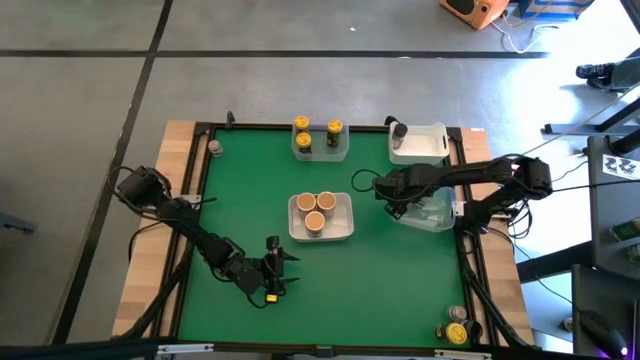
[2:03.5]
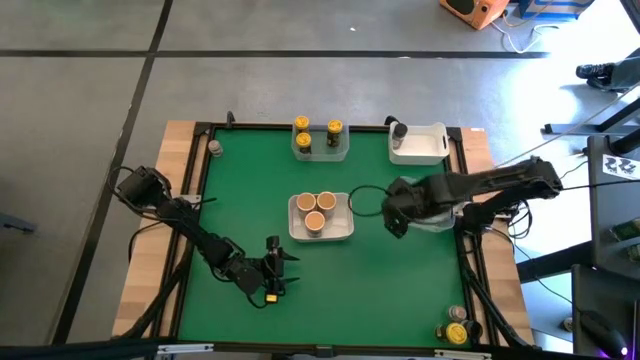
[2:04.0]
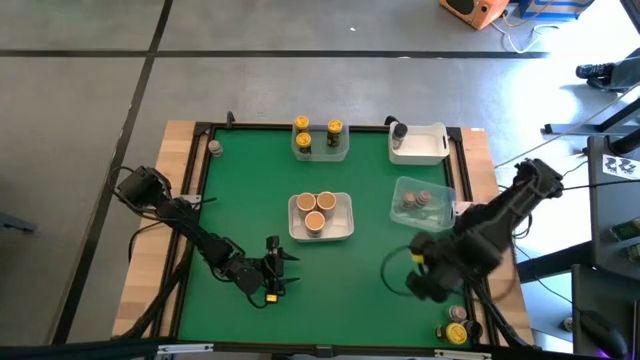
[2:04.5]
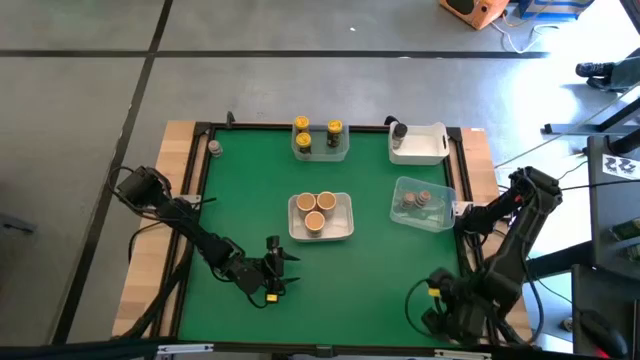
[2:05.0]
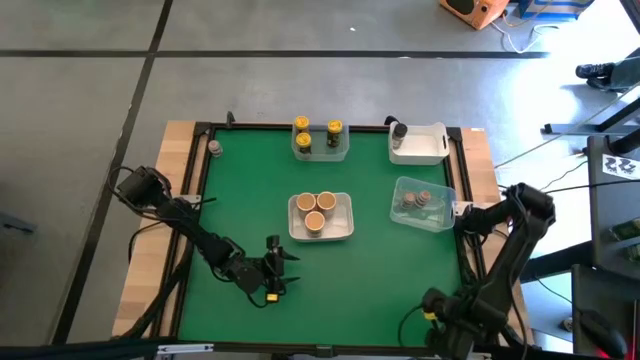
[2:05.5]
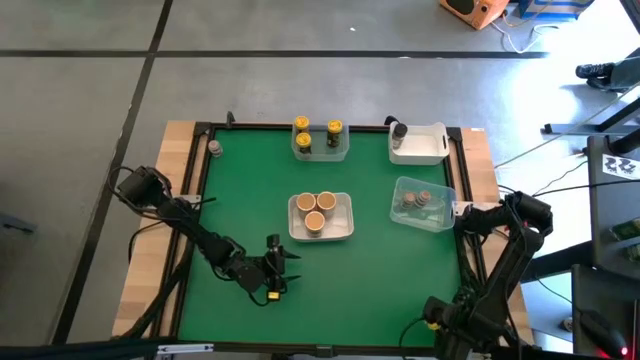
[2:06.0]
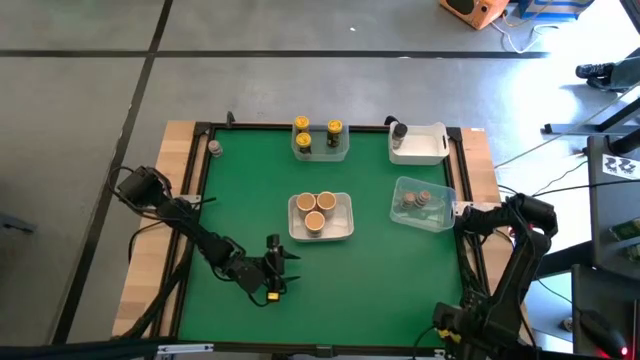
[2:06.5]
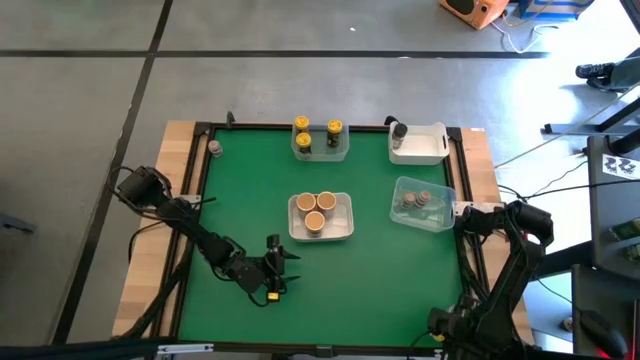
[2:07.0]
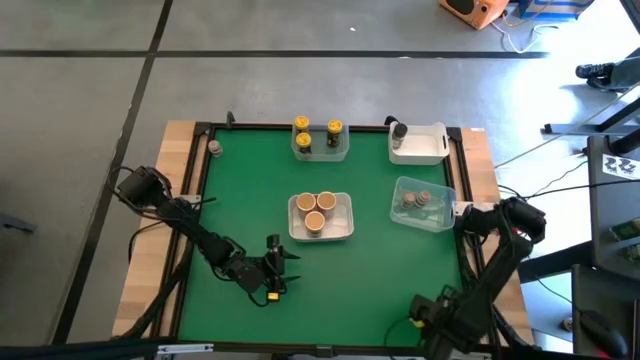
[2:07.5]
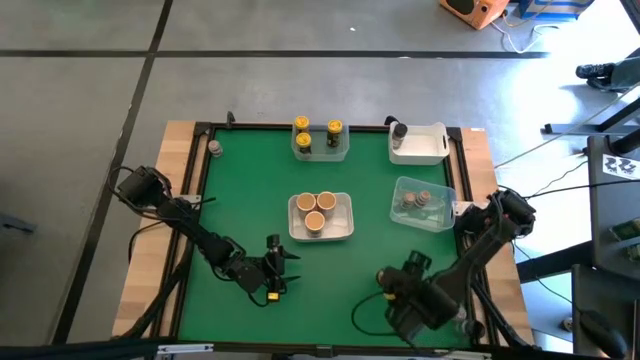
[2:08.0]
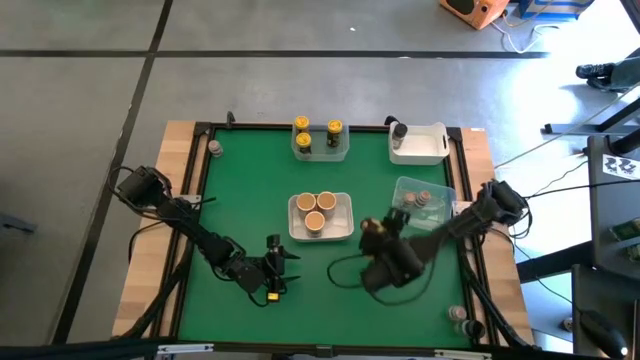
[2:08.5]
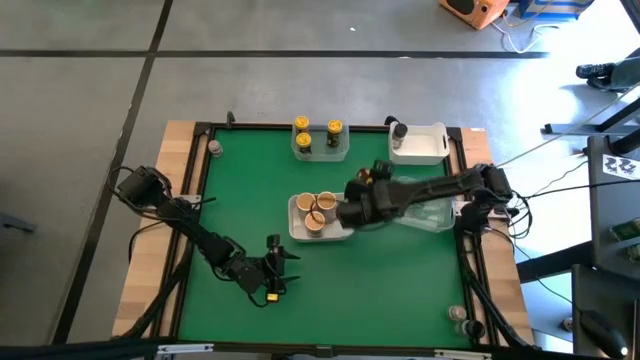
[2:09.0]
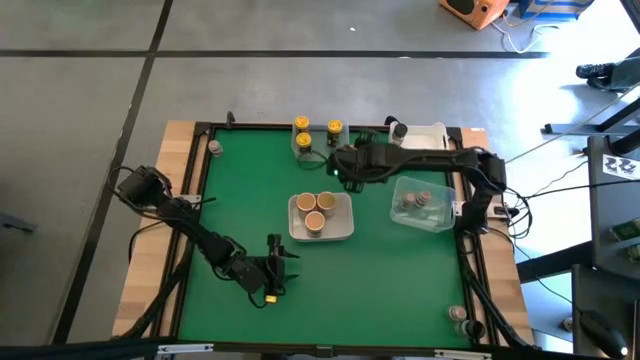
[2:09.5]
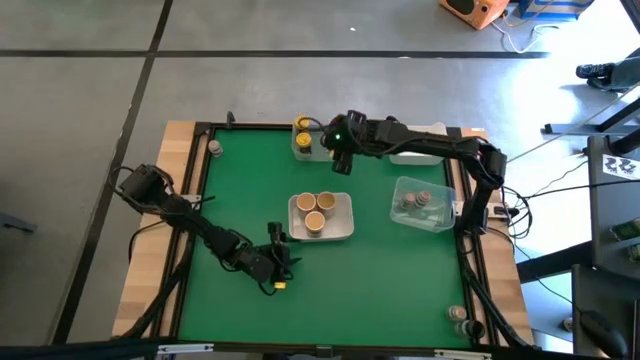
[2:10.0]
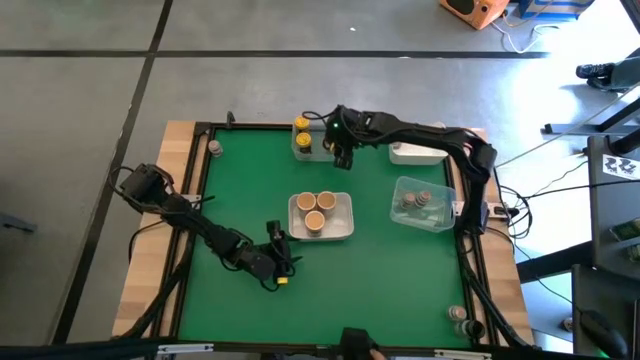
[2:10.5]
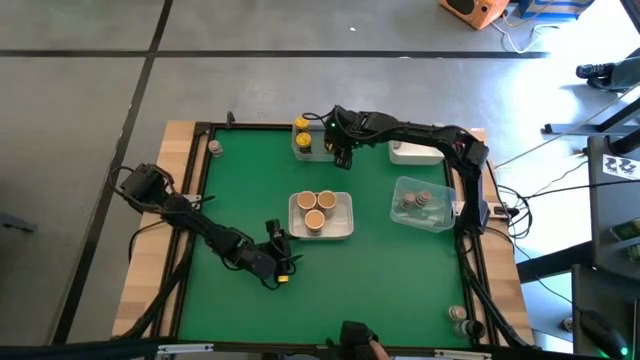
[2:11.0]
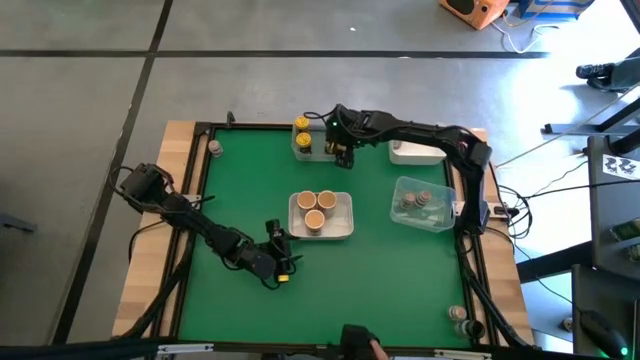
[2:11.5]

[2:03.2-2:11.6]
Task: Sort spices by type
Put the yellow seasoning bottle into the top transparent bin

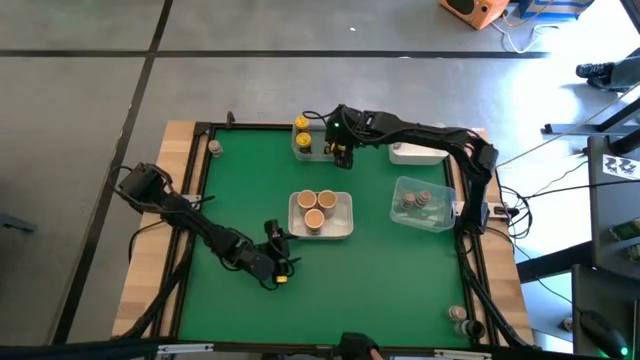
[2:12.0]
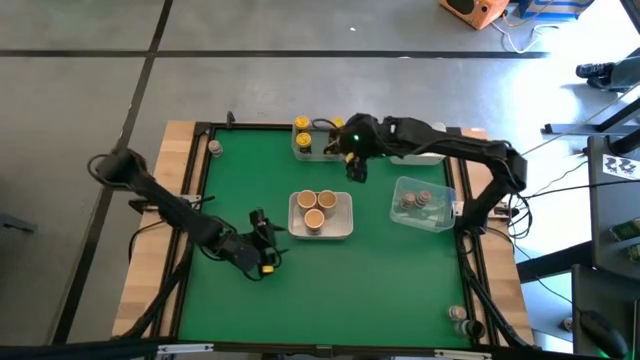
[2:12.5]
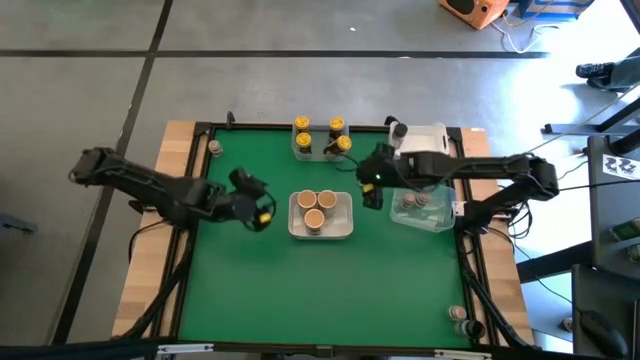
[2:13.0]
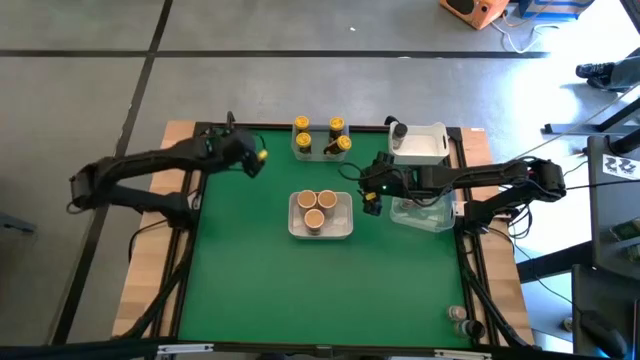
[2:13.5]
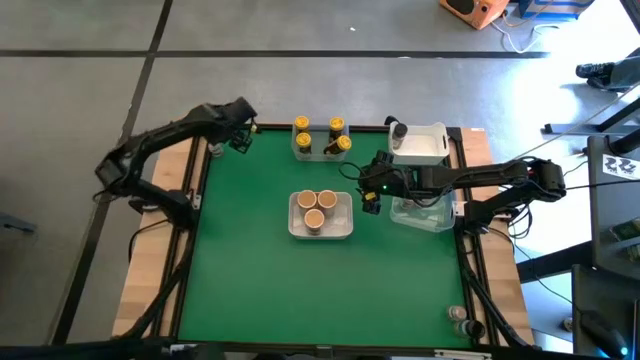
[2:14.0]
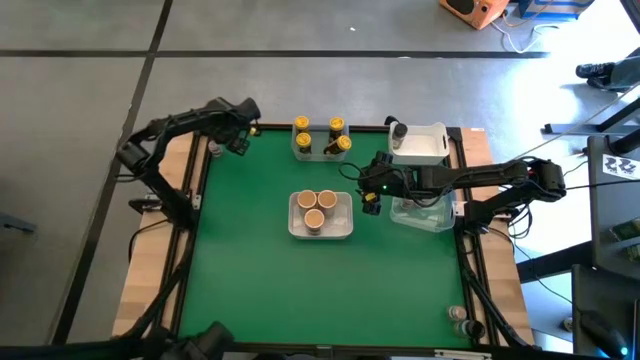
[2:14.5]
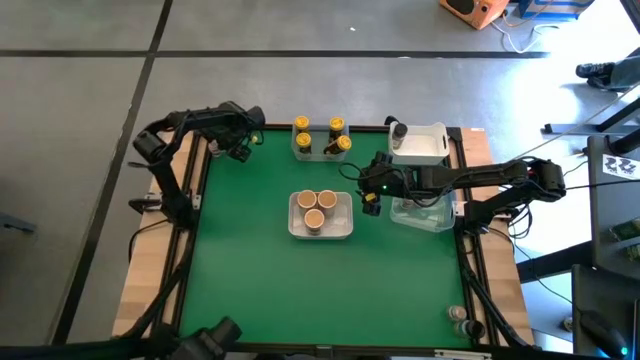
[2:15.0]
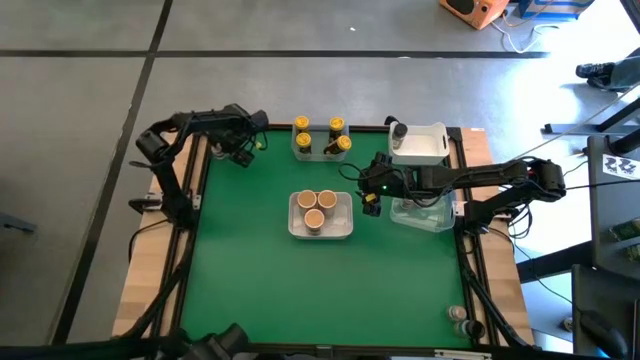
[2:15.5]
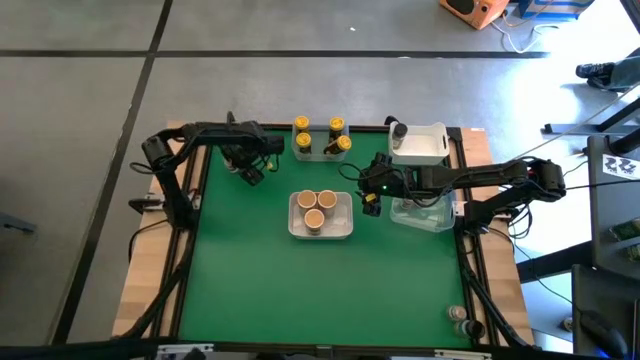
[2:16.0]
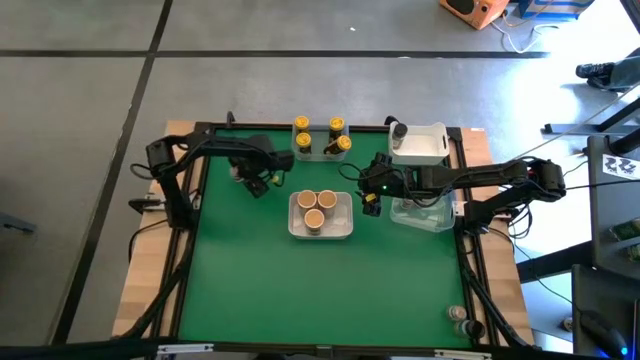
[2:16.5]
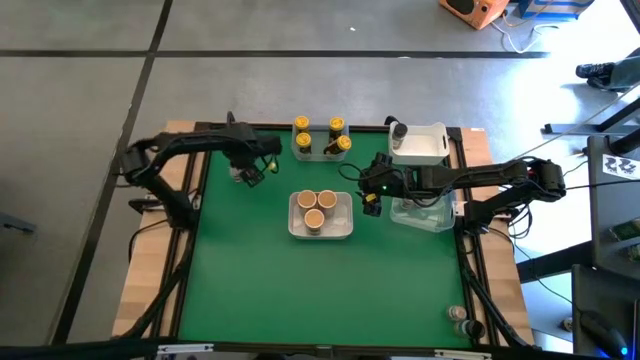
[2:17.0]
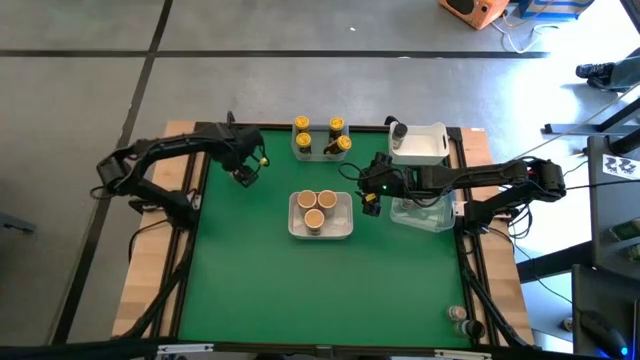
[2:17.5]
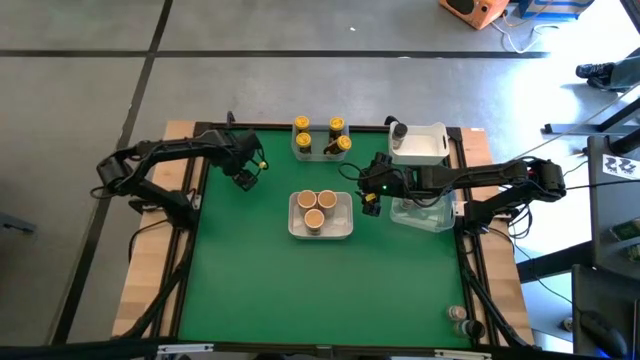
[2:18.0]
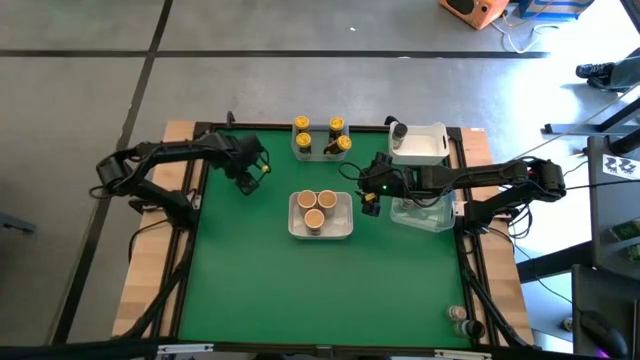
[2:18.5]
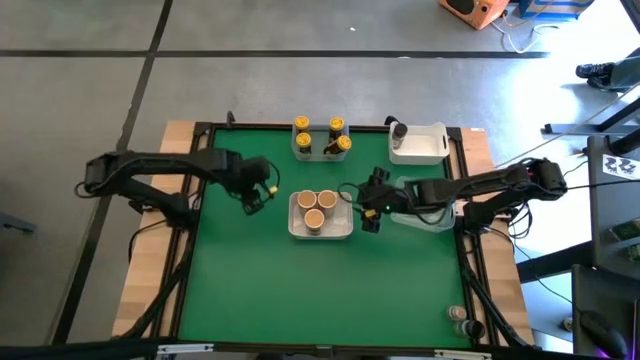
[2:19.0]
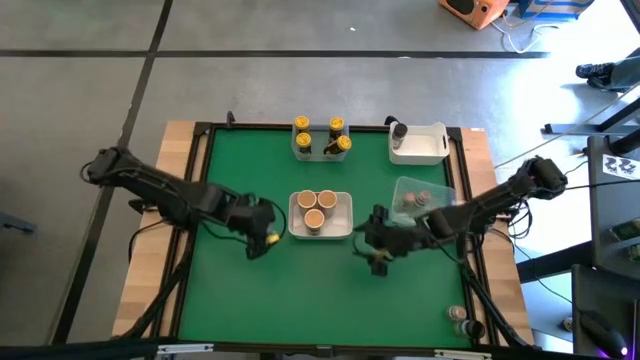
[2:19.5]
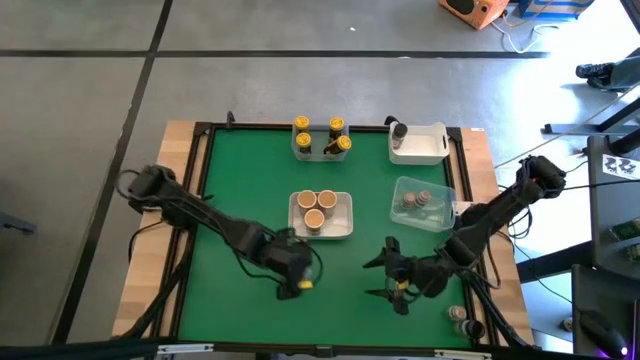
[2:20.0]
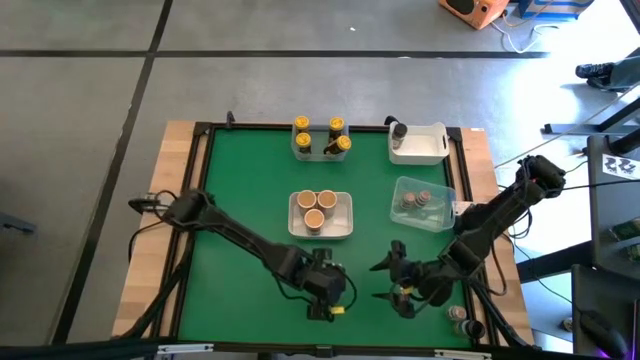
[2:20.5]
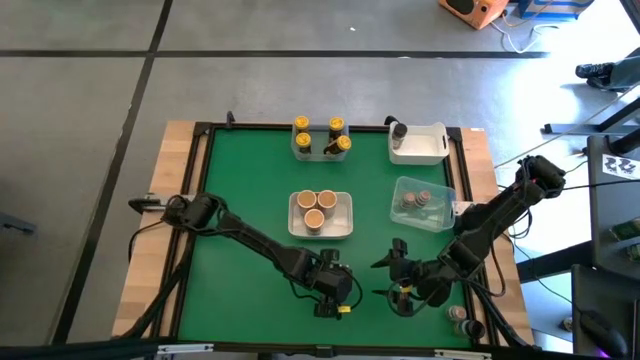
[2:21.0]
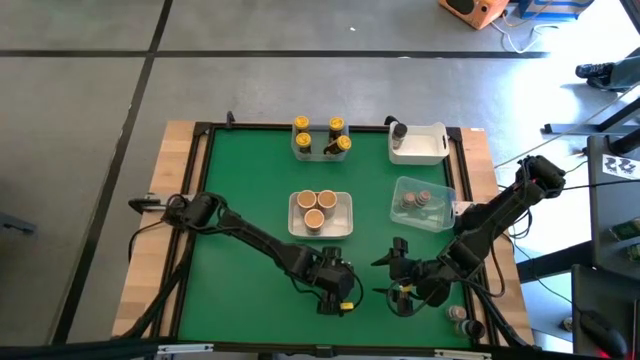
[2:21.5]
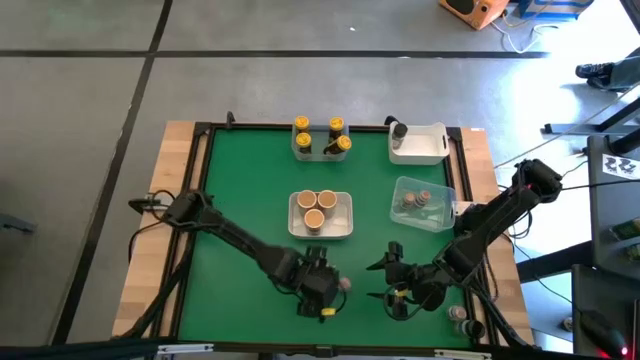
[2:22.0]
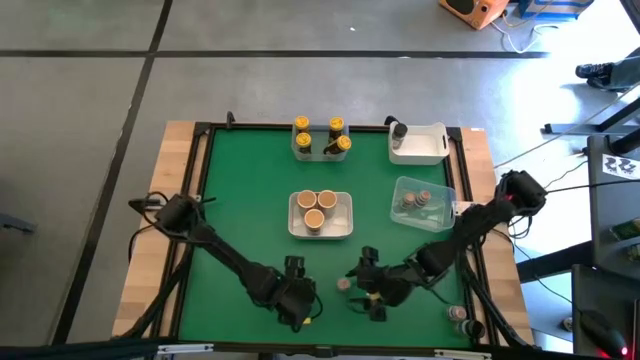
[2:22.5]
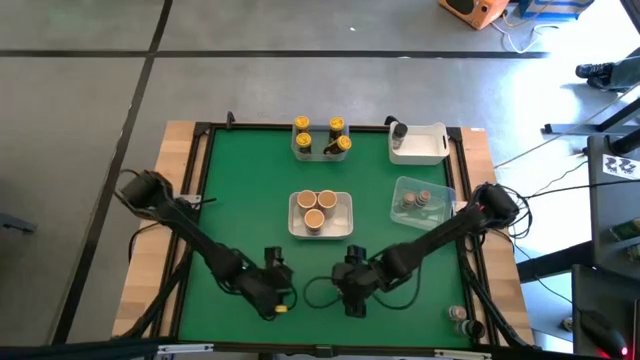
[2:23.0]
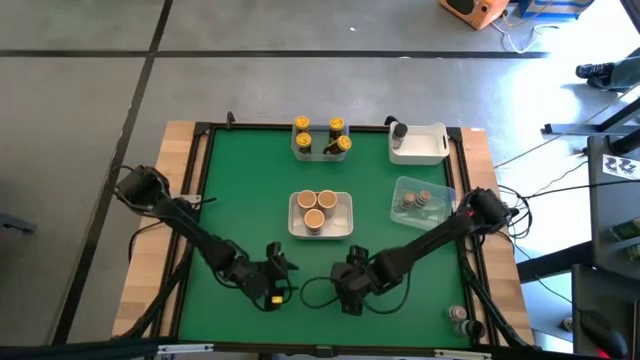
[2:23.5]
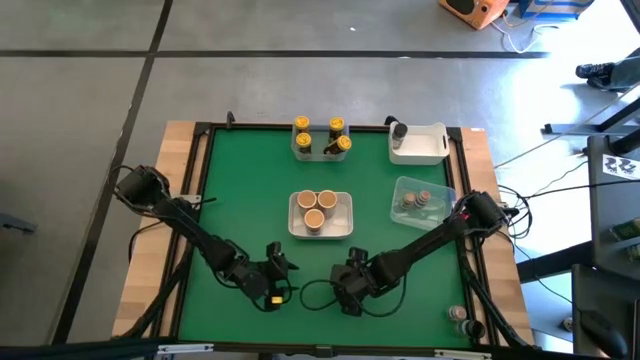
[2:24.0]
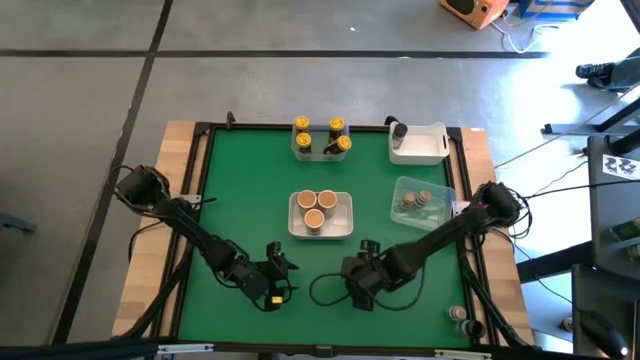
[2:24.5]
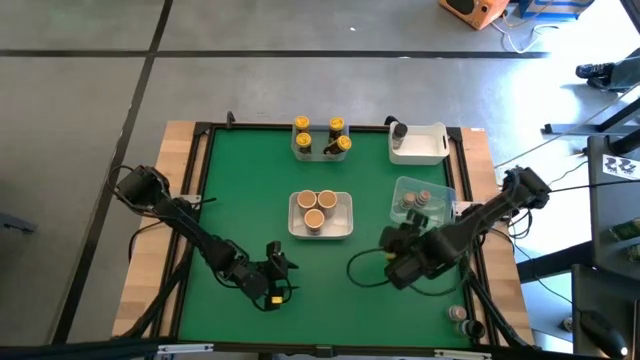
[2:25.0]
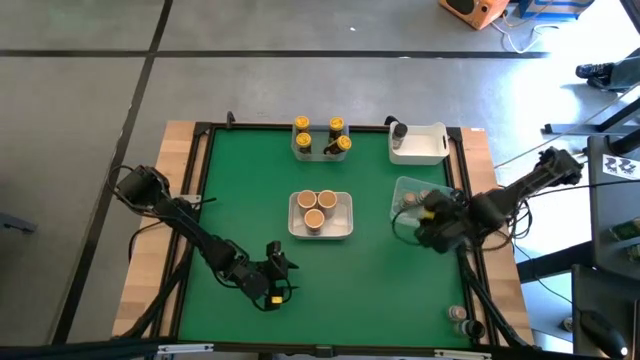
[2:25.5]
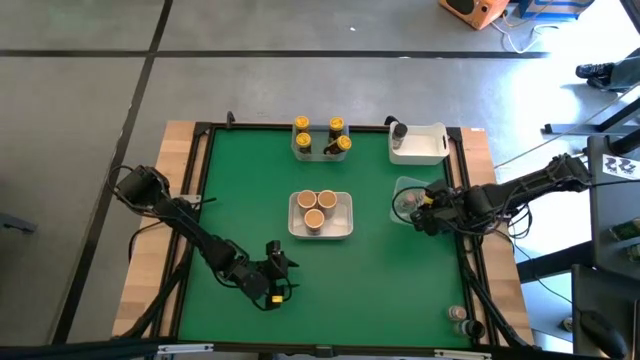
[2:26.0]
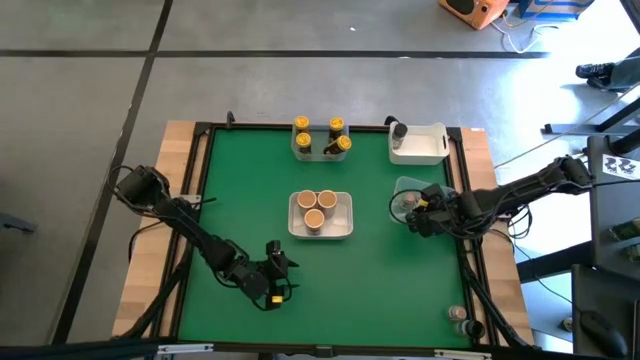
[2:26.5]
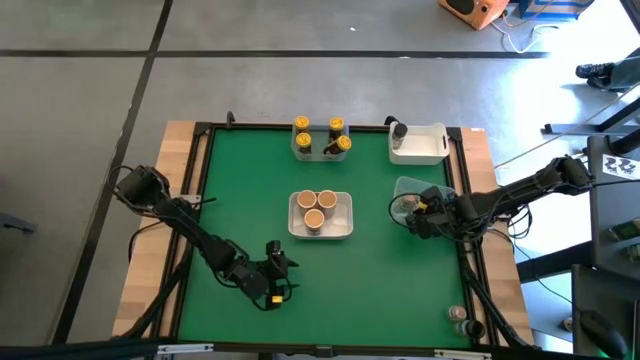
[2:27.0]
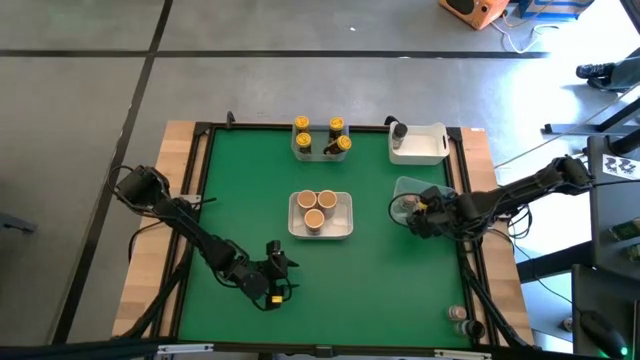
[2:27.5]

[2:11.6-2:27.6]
Put the top brown seasoning bottle into the bottom transparent bin
